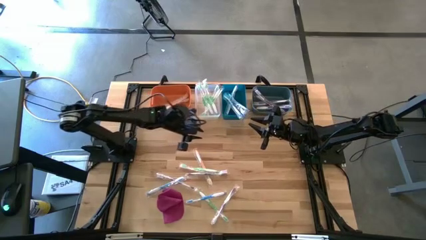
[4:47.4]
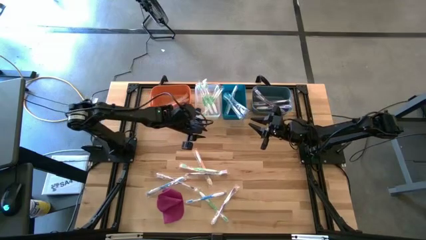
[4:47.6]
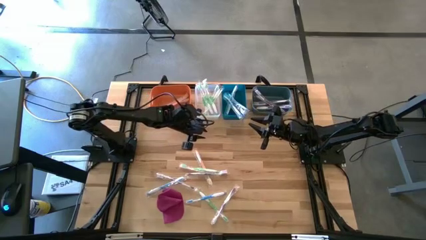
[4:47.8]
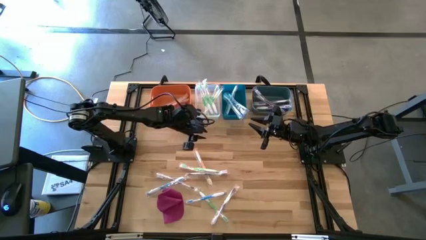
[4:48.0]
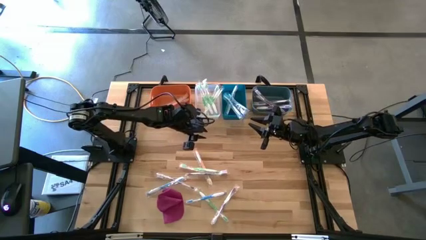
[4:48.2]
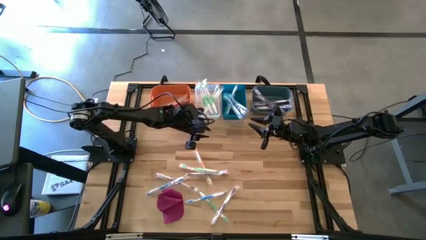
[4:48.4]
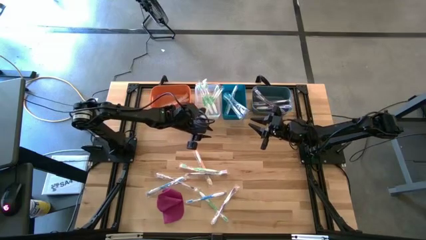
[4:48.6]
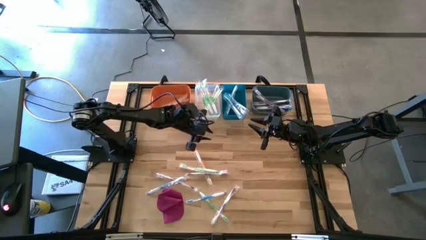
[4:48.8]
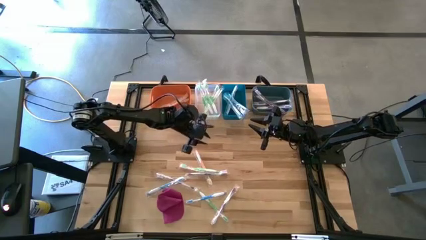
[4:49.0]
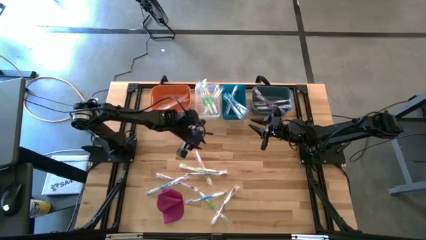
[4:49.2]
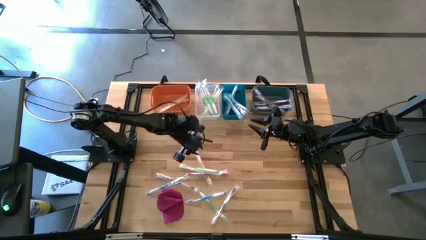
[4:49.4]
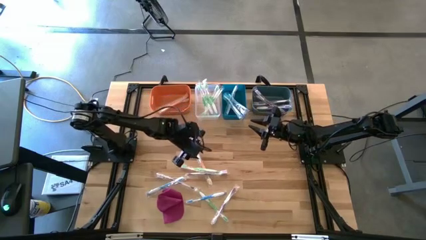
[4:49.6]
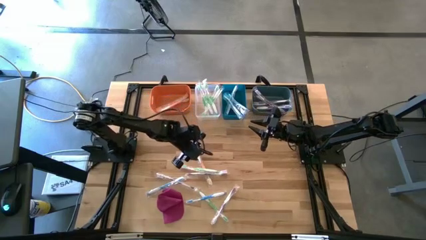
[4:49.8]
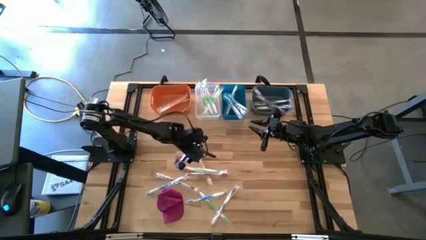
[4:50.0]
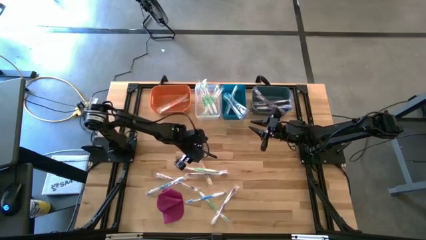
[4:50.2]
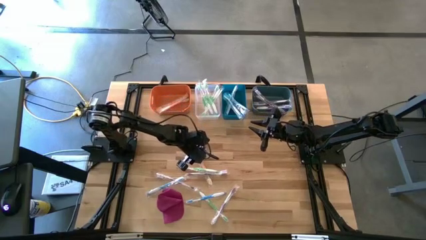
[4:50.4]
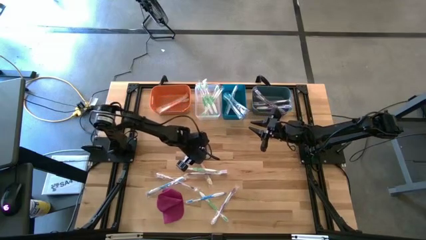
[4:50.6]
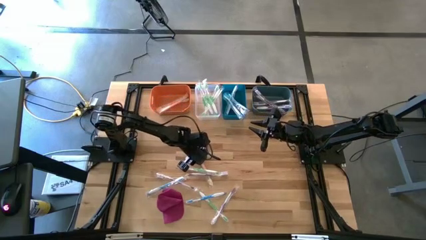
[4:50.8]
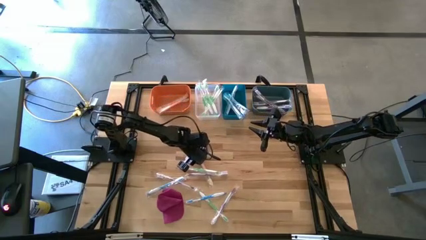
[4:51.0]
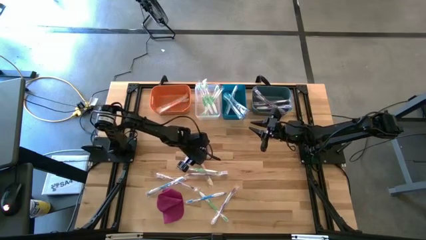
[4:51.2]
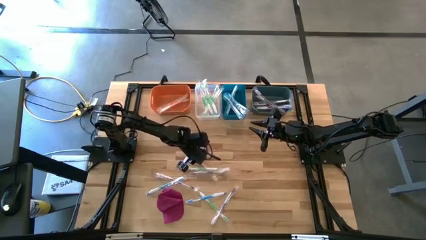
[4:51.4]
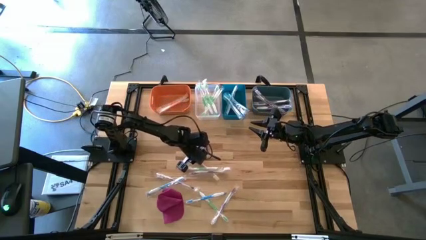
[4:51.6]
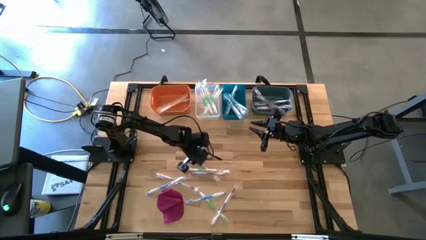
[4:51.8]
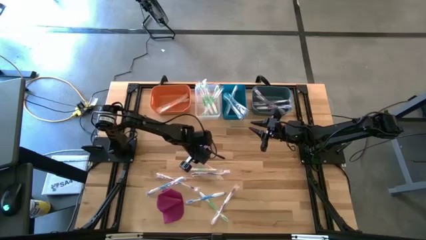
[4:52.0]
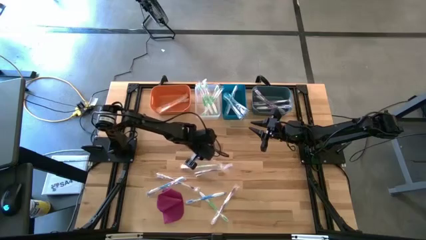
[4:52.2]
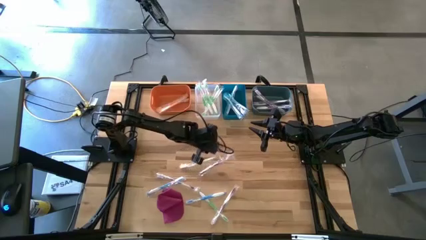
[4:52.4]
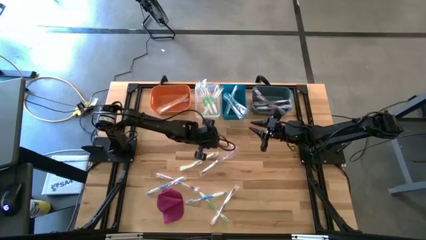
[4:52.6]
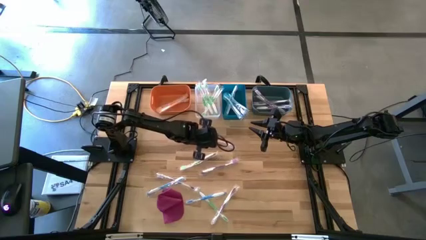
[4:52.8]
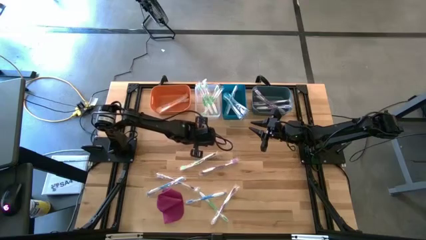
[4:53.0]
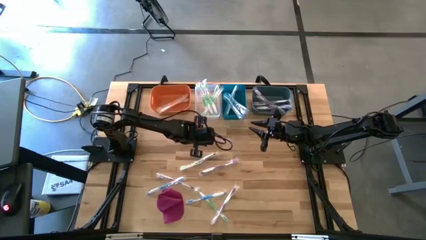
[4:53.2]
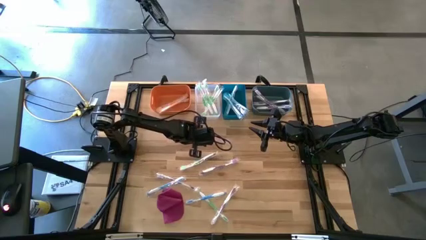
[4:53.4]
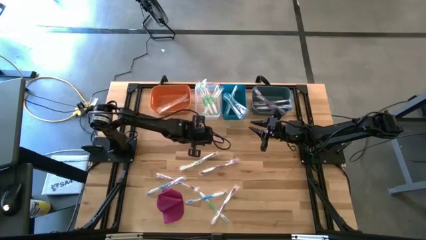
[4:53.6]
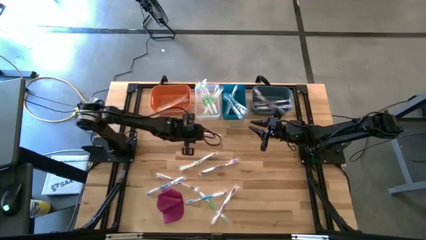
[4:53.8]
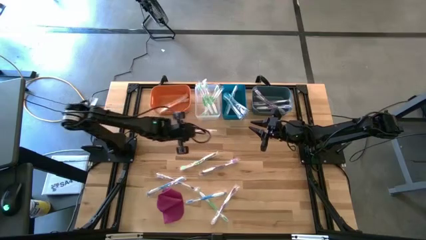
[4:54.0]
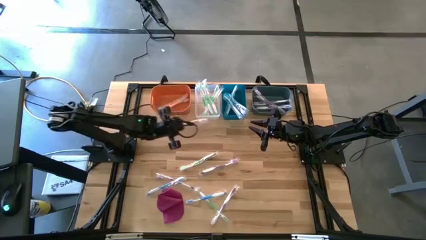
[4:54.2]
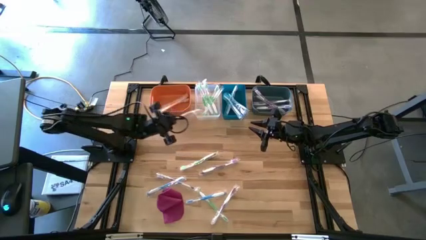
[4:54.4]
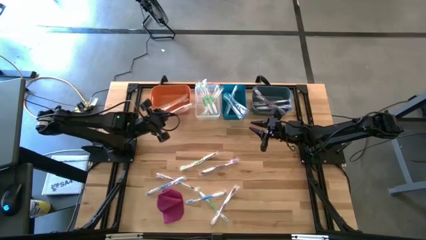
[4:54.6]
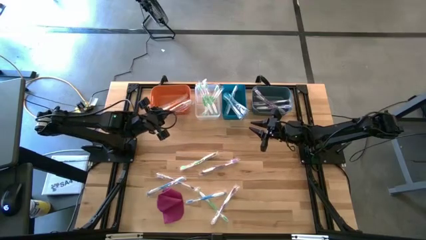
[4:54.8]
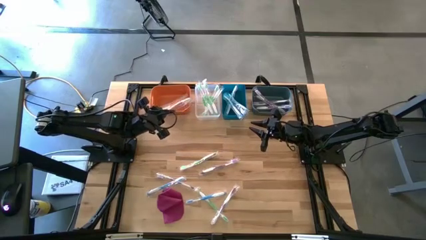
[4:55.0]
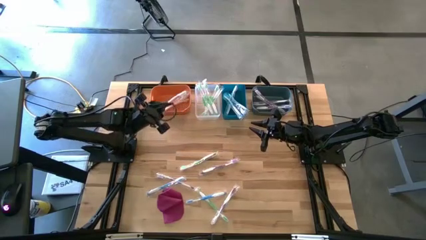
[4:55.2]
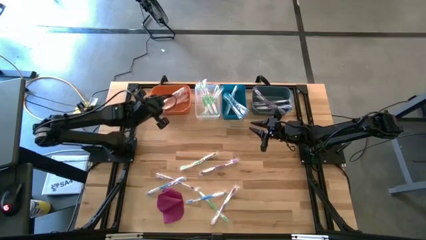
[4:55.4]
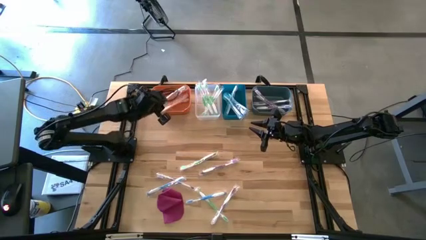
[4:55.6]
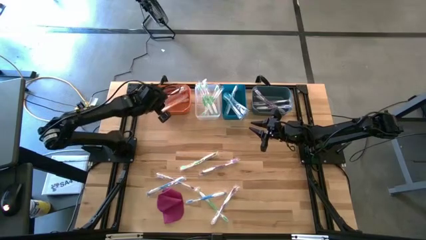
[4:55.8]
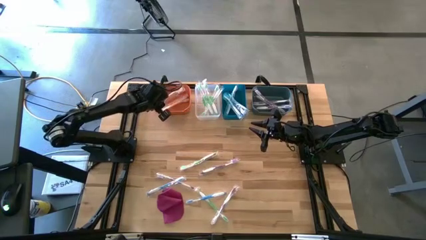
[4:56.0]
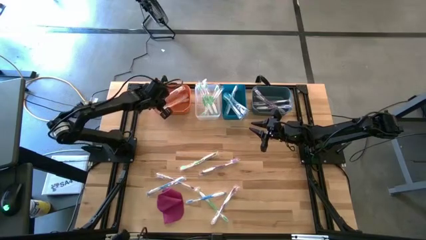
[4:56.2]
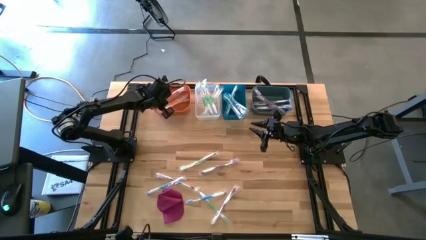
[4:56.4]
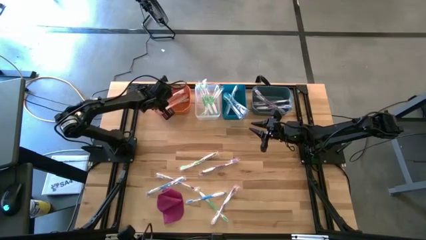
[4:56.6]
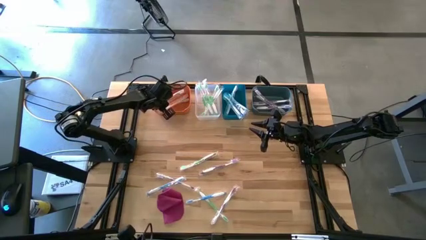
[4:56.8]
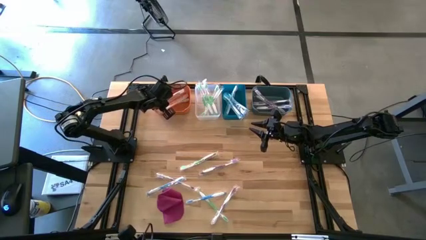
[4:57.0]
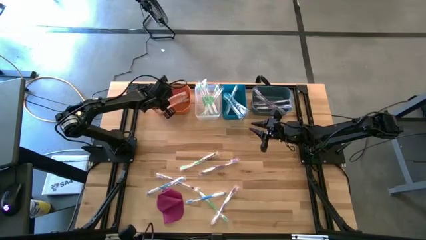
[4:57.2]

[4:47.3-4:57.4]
Task: Pick & Place Toothbrushes
Put the orange toothbrush into the orange bin
